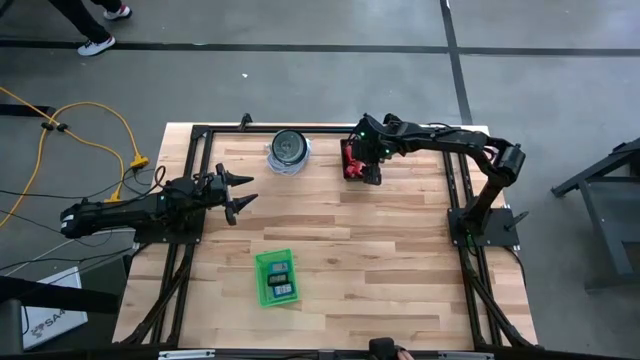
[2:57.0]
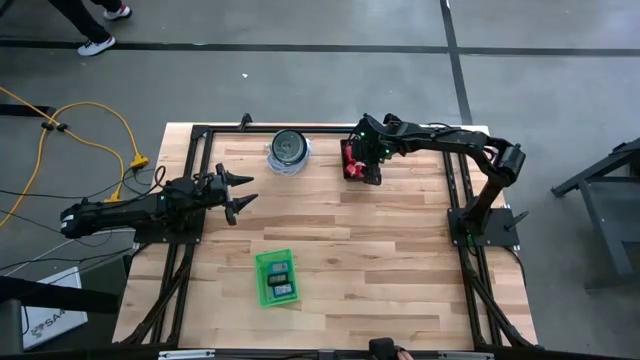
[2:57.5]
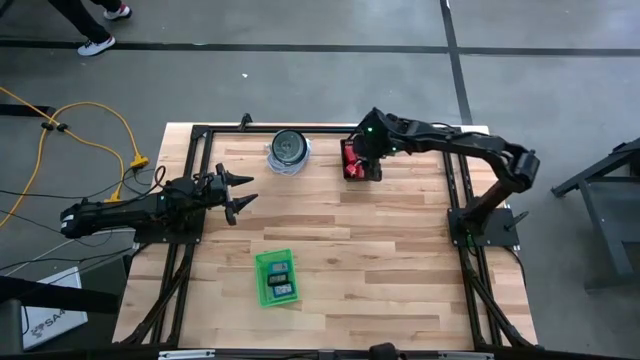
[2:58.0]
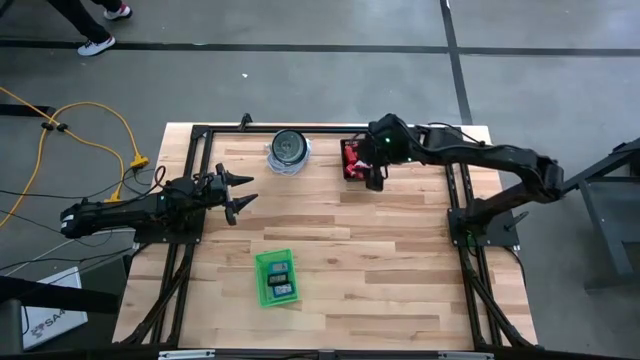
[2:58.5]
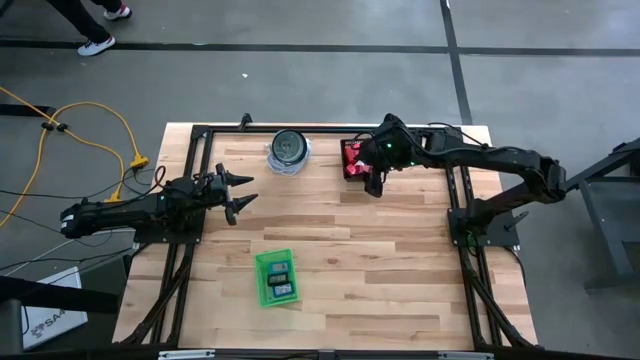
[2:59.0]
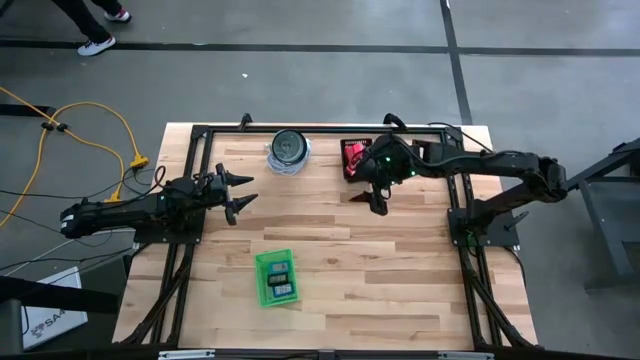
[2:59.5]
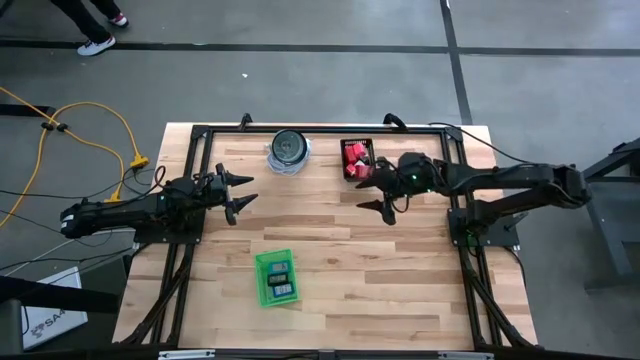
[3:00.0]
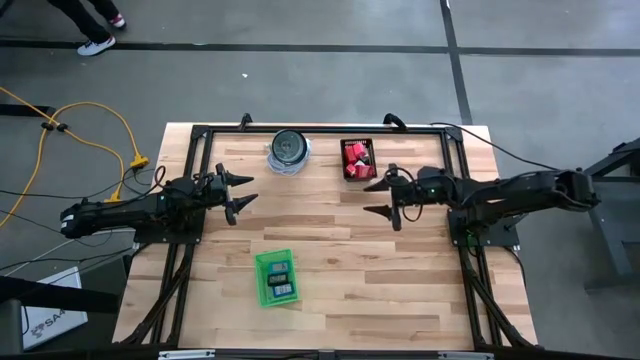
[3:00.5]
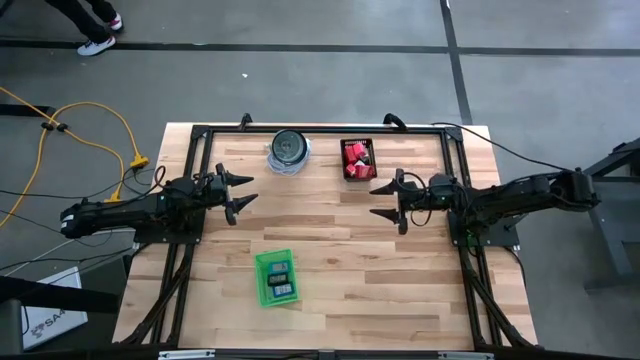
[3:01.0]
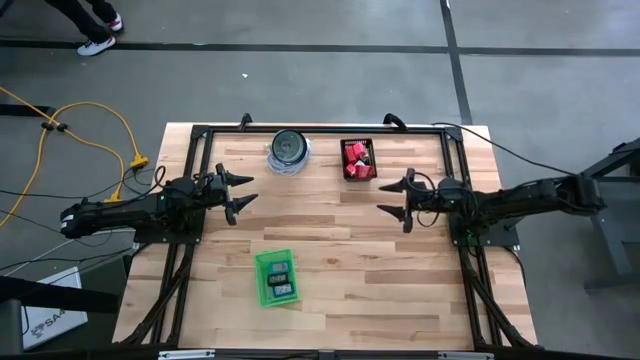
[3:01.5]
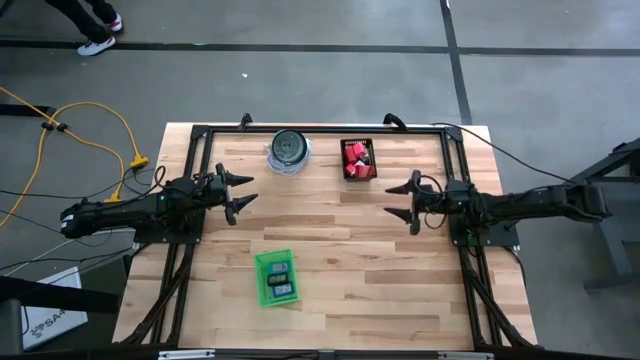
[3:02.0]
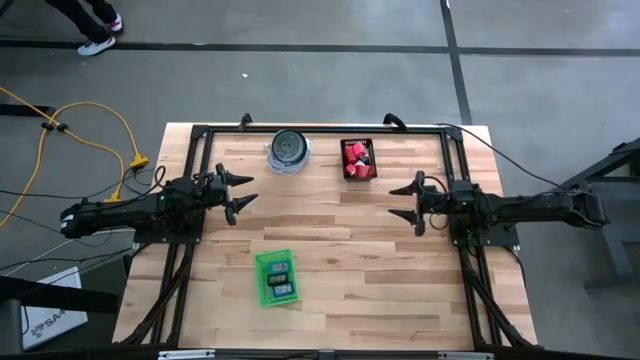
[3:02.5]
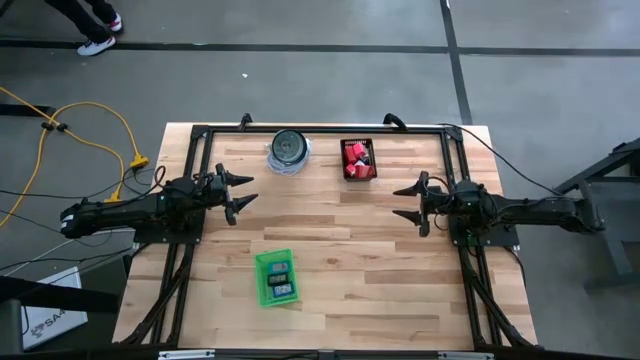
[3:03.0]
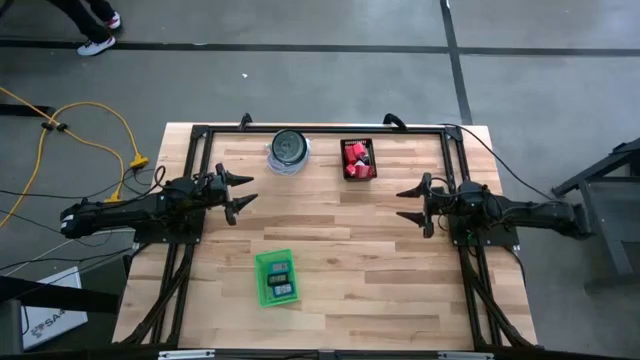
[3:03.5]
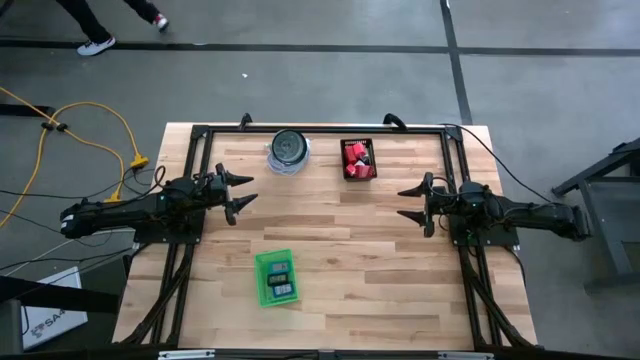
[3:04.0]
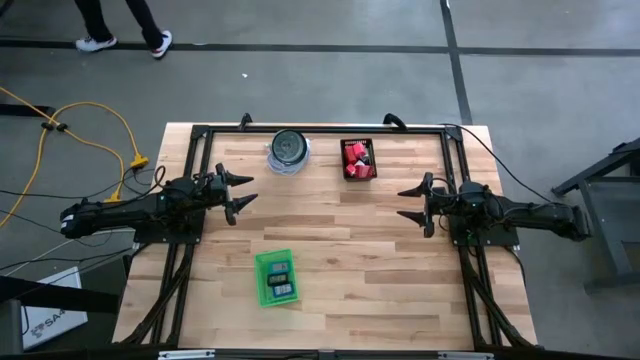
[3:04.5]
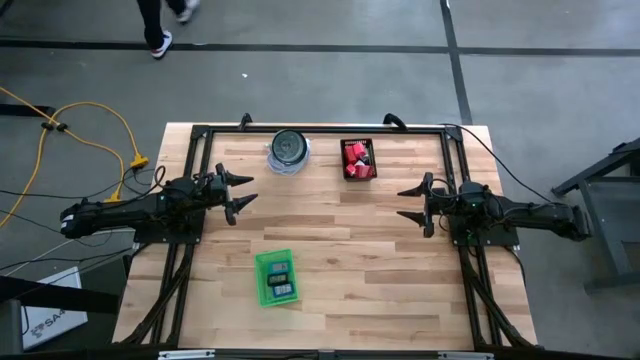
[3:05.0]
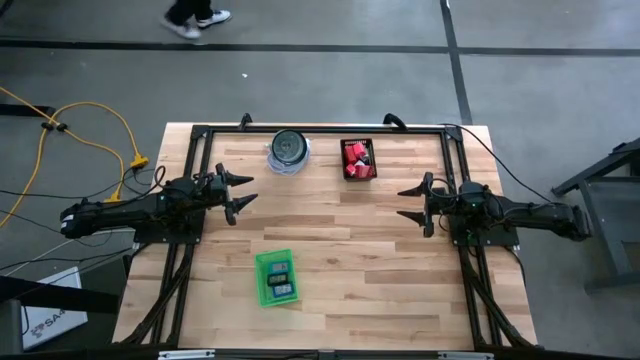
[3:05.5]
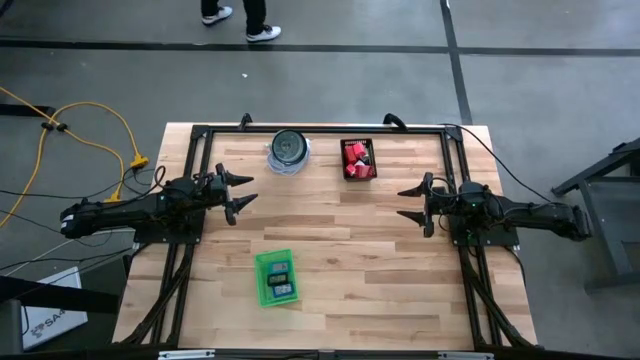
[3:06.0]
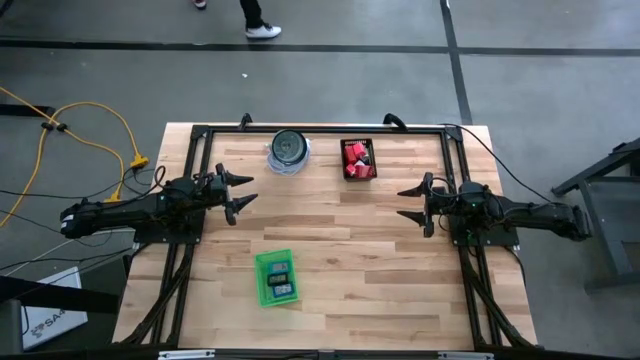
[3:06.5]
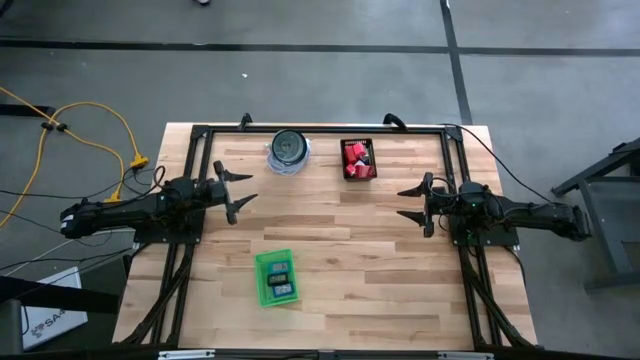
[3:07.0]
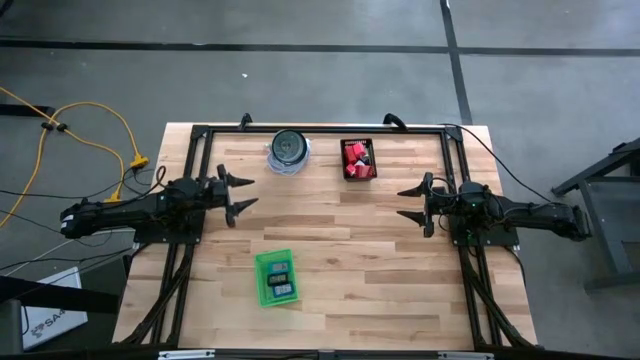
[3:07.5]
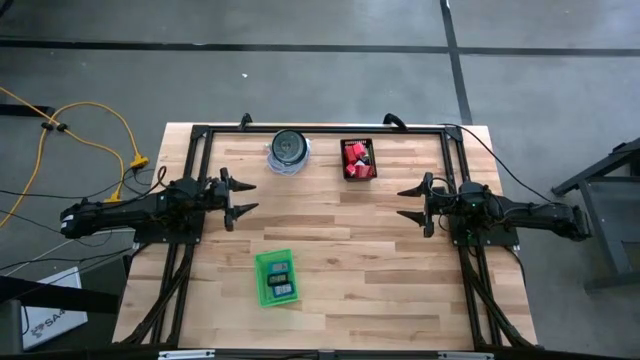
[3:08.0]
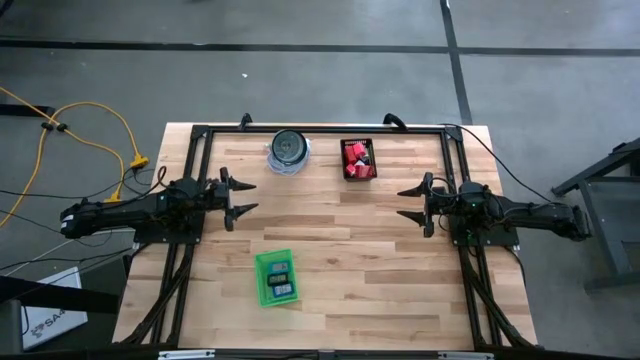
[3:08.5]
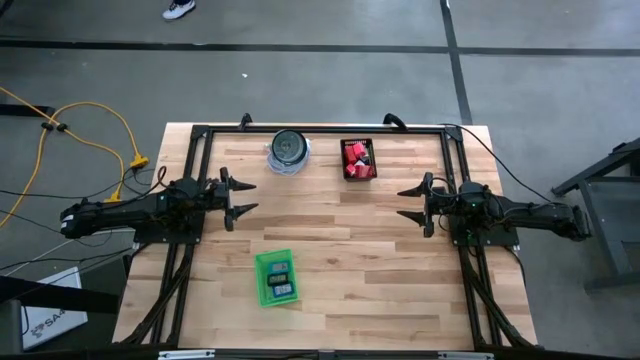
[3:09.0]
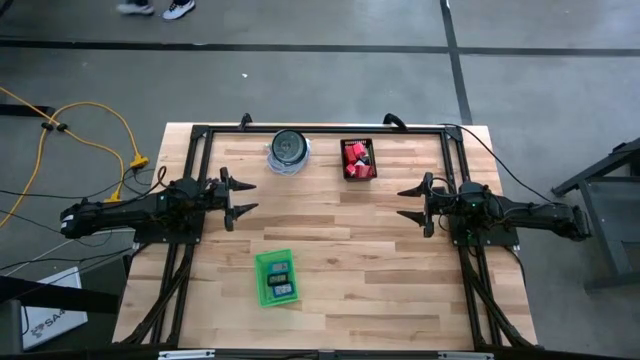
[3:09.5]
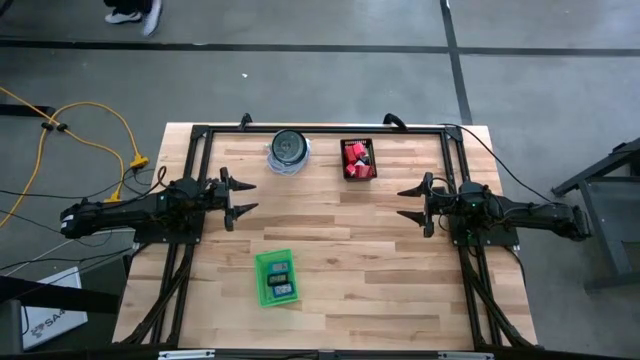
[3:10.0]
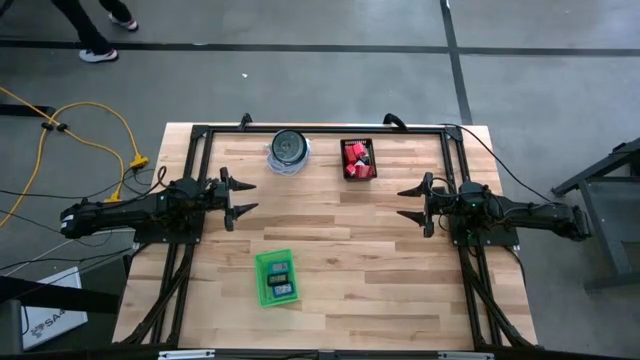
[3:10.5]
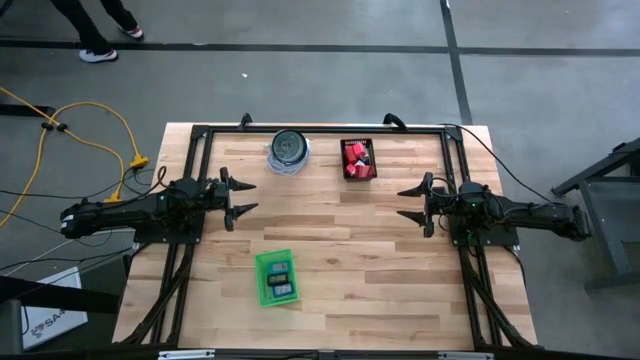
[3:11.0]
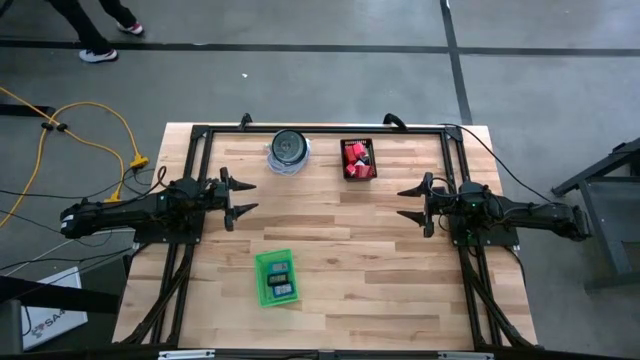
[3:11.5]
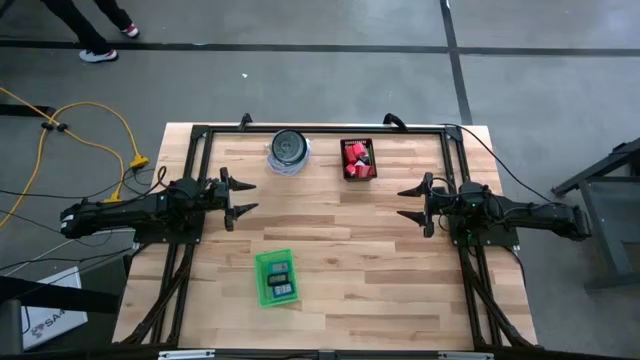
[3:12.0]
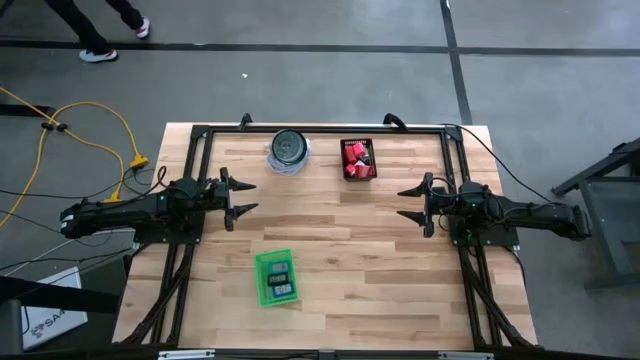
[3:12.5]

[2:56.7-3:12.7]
Task: Pick & Place Office items
Return to Home Position

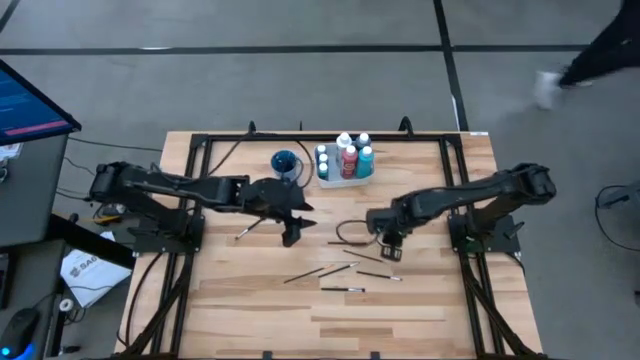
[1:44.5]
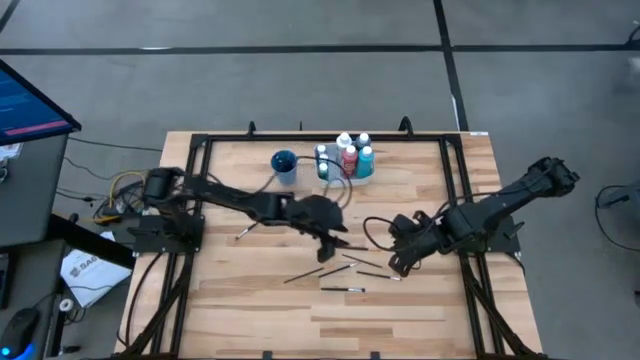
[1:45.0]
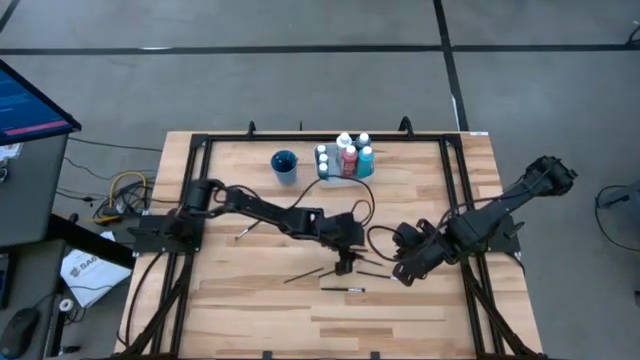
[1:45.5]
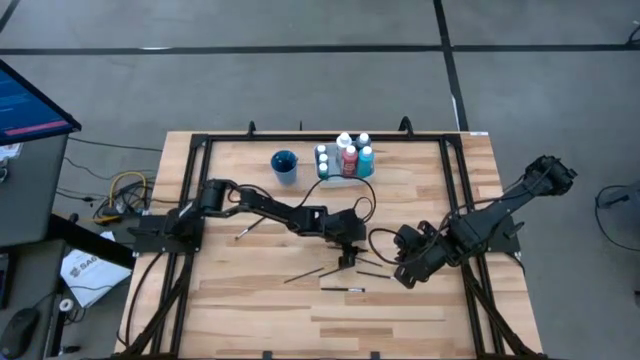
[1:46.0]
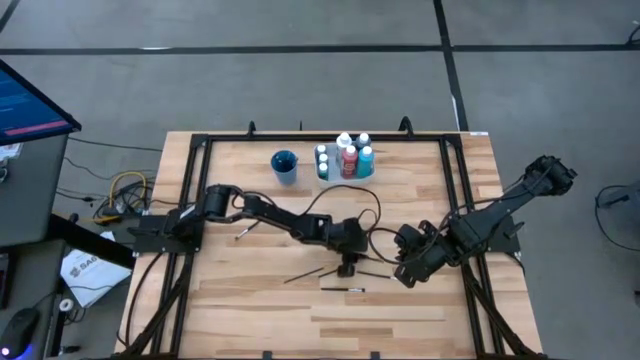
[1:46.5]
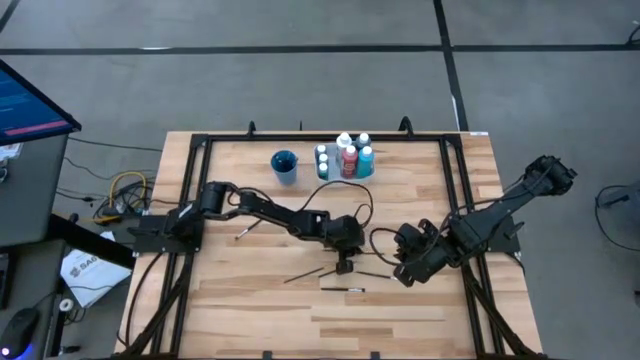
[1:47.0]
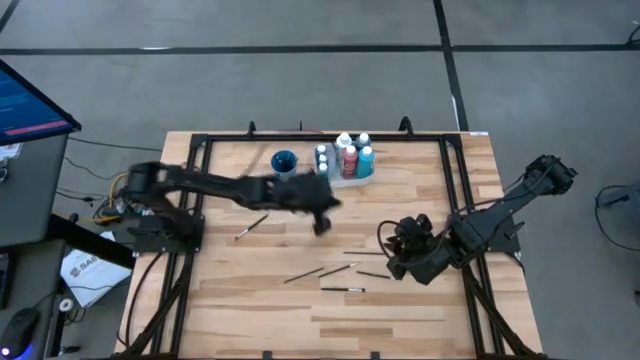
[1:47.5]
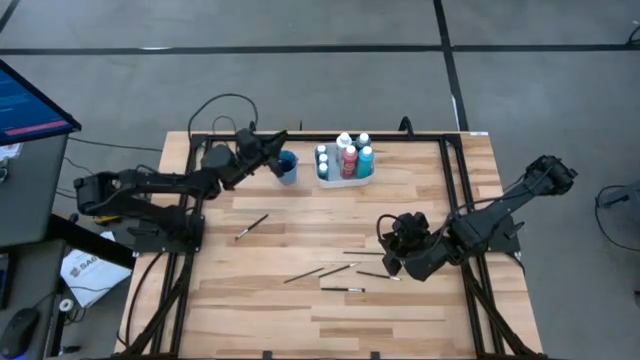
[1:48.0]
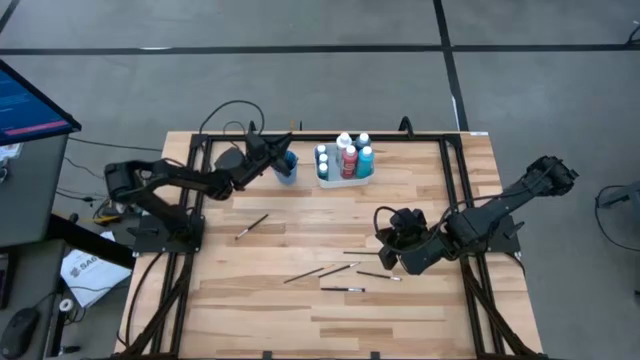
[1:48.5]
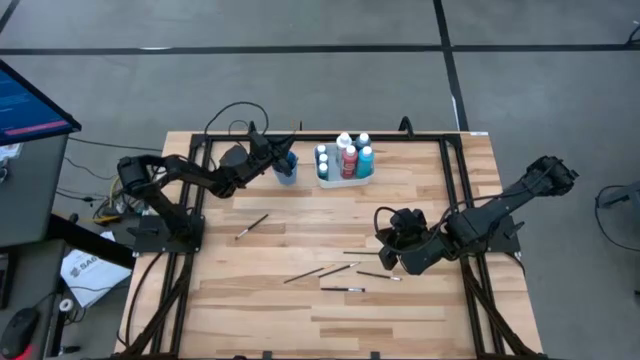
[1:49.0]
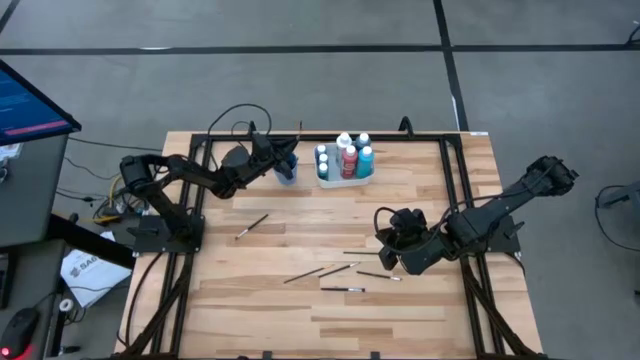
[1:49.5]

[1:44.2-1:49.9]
Task: Pick & Place Paint Supplies
Put the gold and black paint brush into the blue cup
